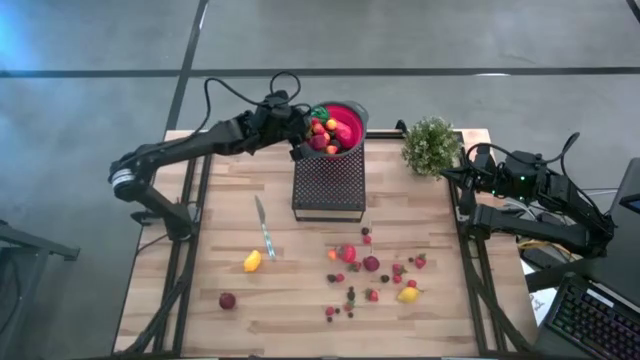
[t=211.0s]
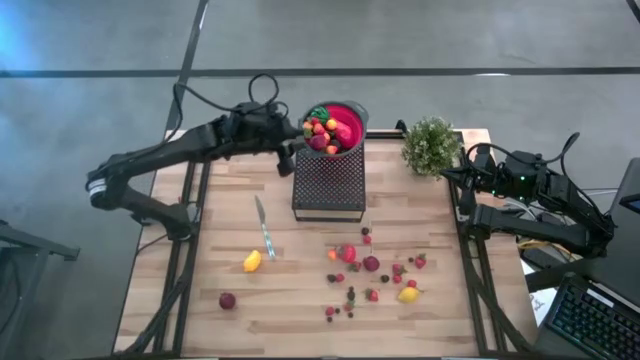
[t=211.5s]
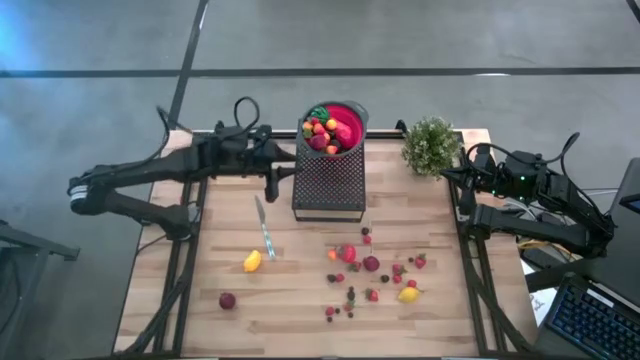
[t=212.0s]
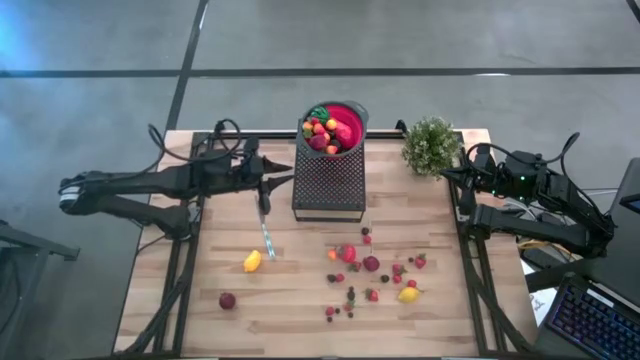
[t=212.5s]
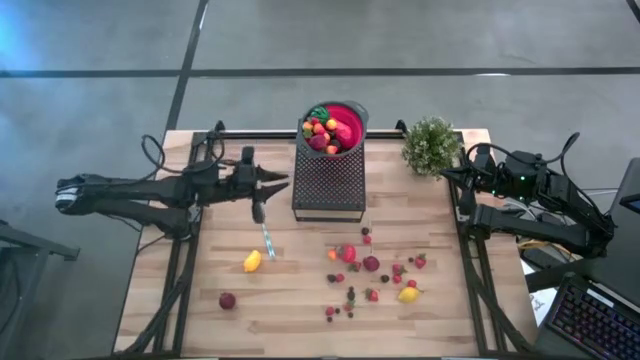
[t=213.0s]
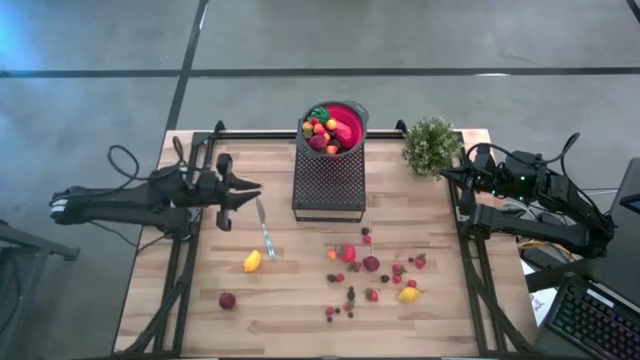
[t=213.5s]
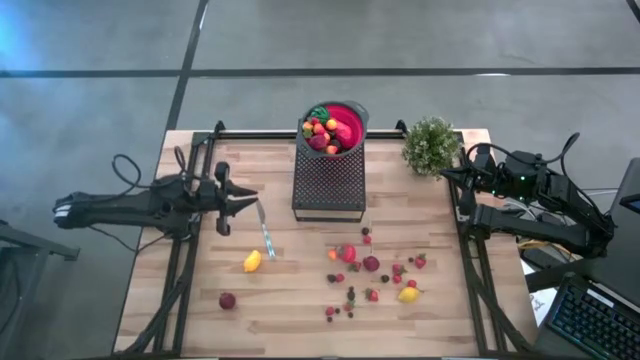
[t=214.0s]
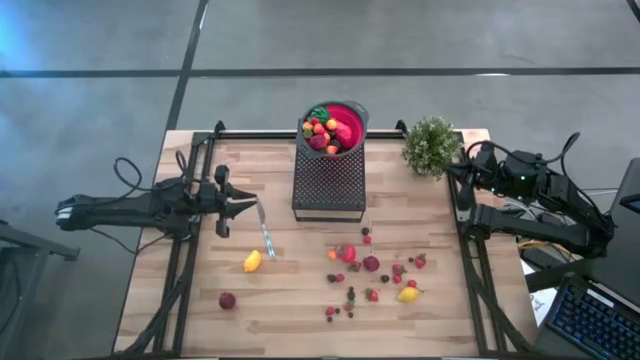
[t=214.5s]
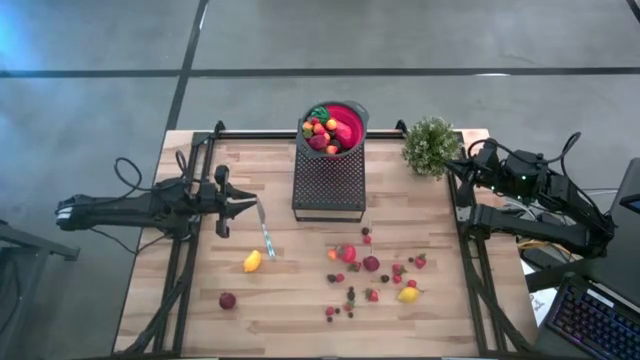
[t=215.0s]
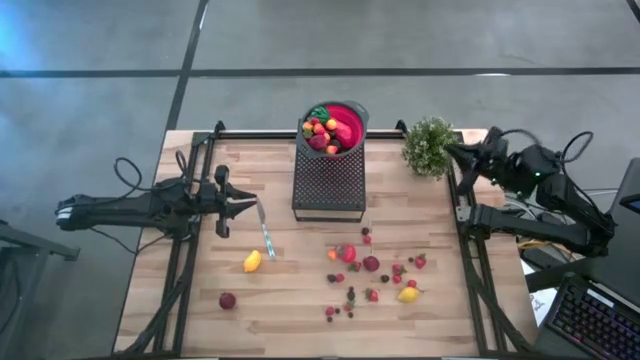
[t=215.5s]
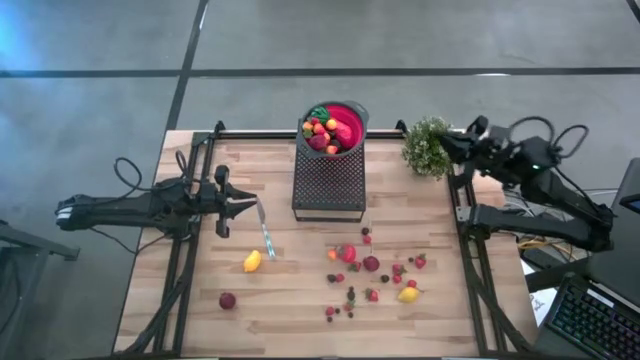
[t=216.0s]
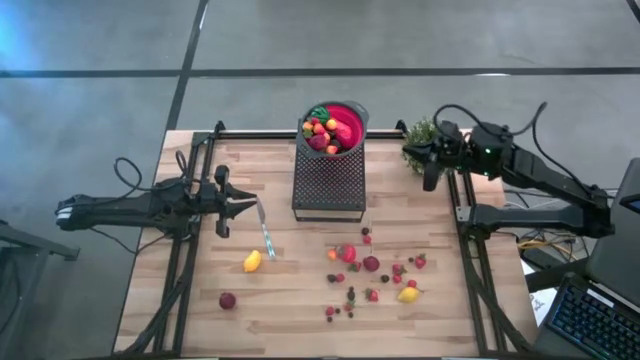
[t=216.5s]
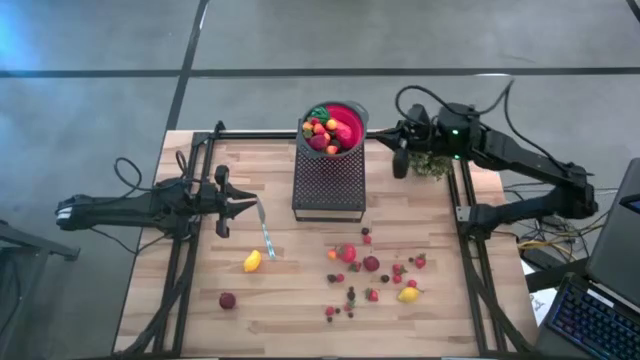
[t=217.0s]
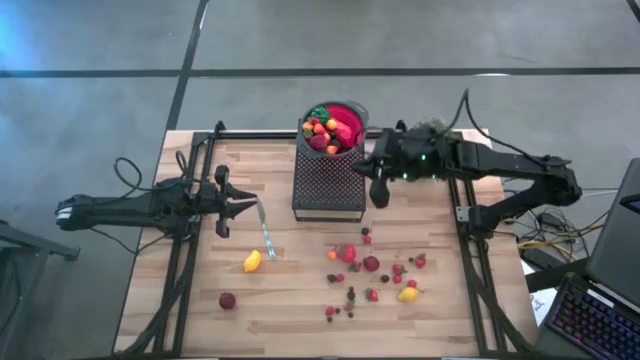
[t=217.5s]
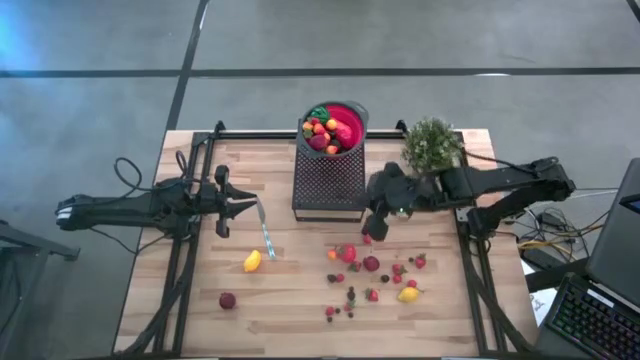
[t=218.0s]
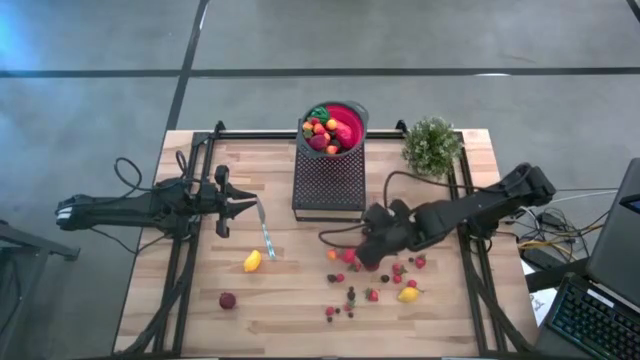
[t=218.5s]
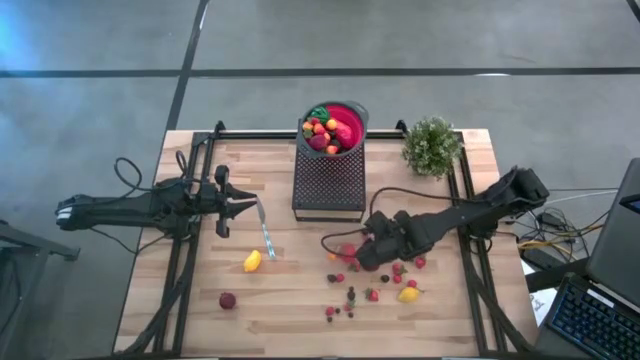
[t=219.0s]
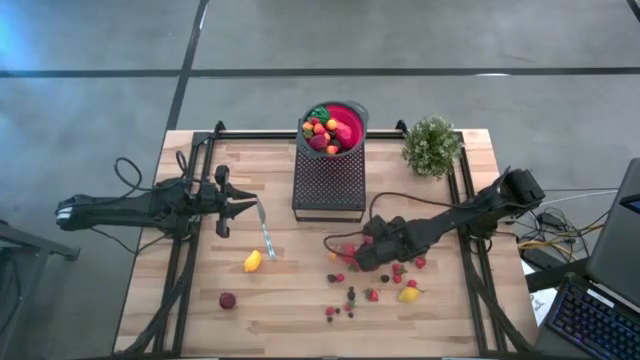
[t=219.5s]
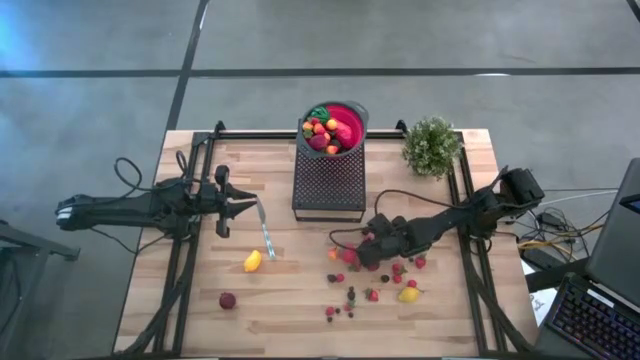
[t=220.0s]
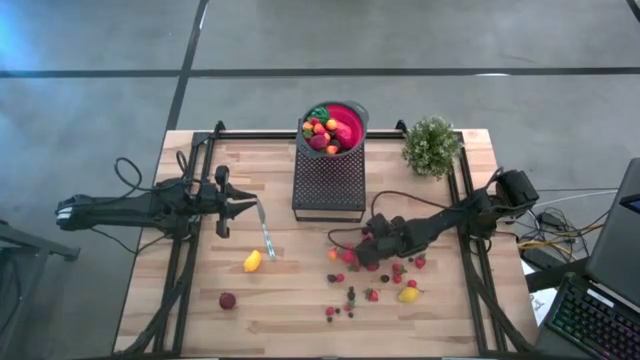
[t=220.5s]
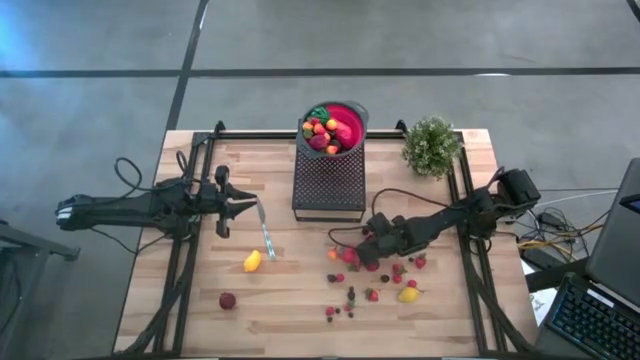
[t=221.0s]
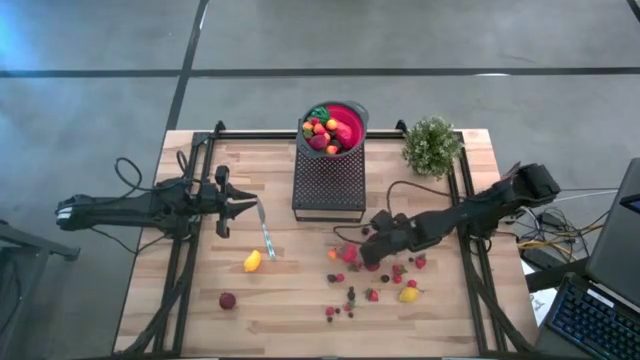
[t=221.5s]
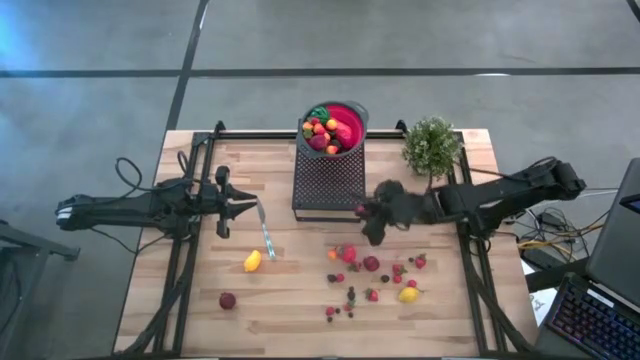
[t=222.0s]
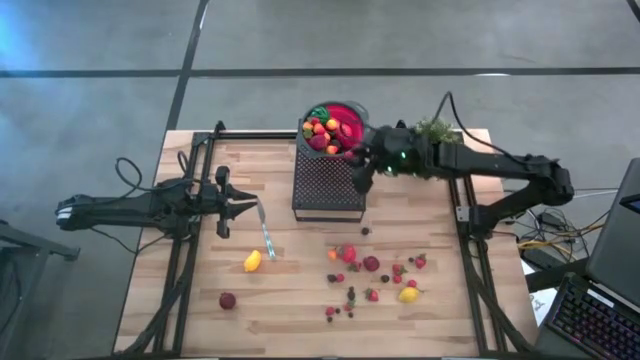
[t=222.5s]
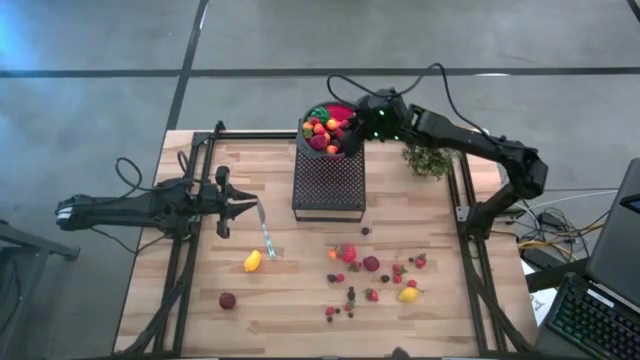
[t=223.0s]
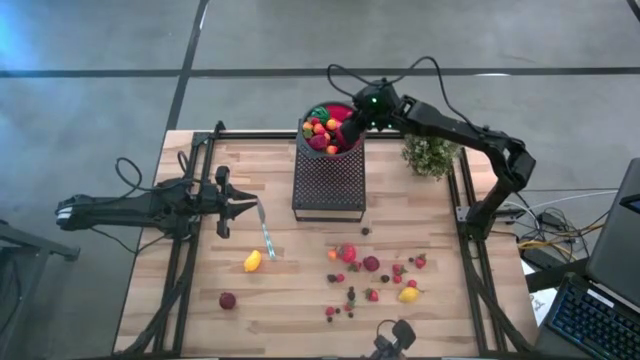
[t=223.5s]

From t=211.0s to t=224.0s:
Task: Pick & Place Fruit
Put the top red cherry into the strainer bowl on the shelf

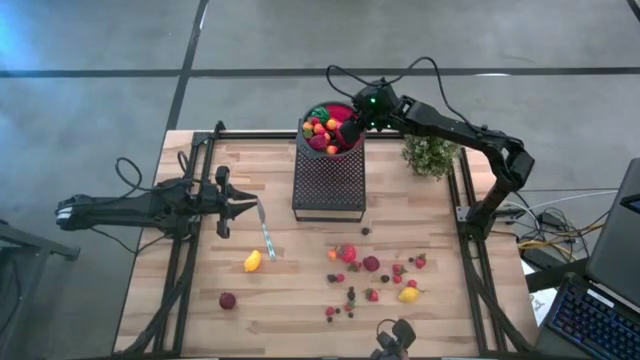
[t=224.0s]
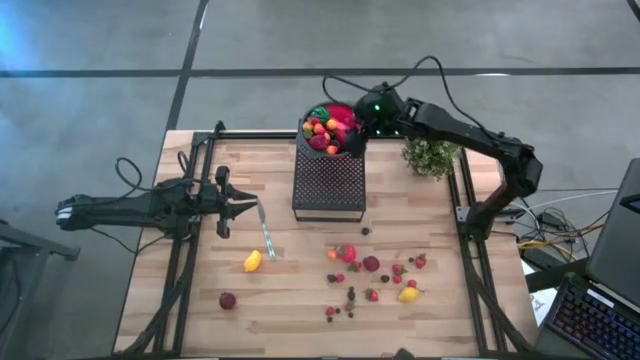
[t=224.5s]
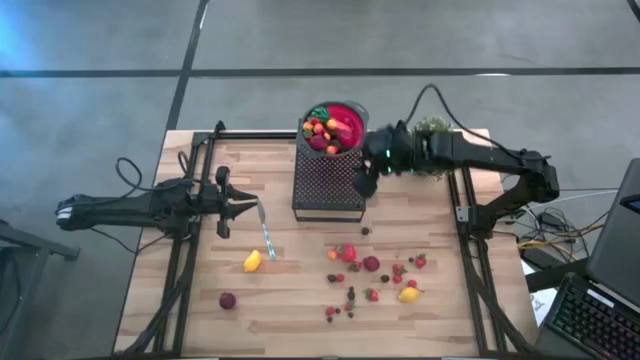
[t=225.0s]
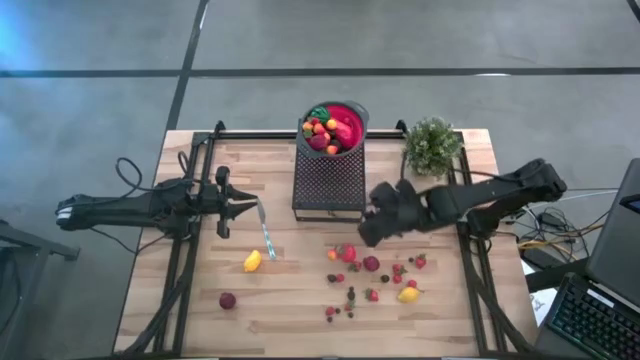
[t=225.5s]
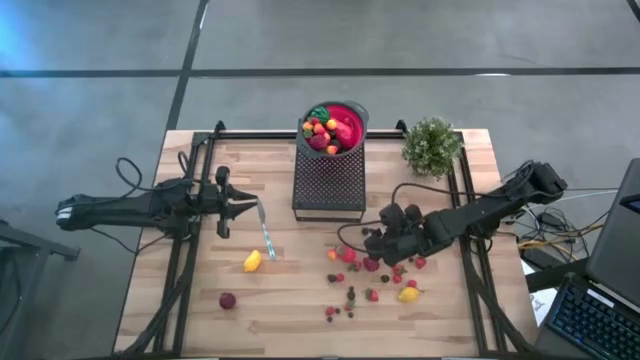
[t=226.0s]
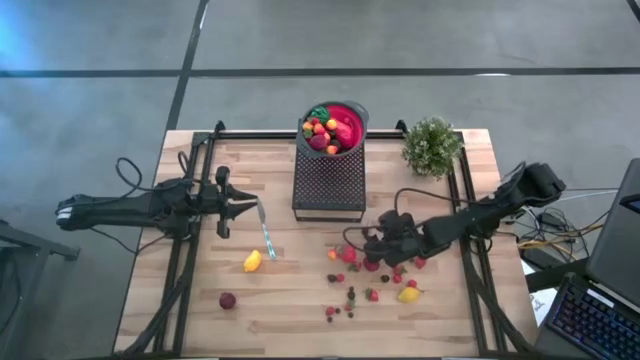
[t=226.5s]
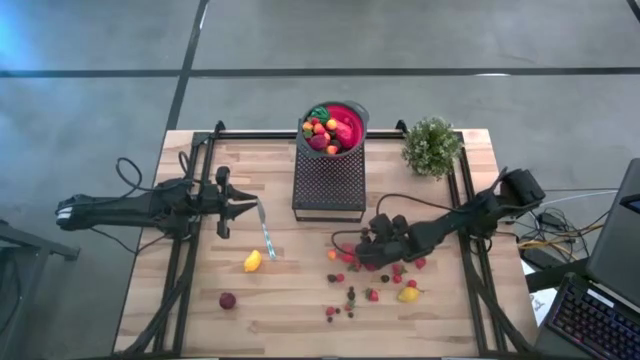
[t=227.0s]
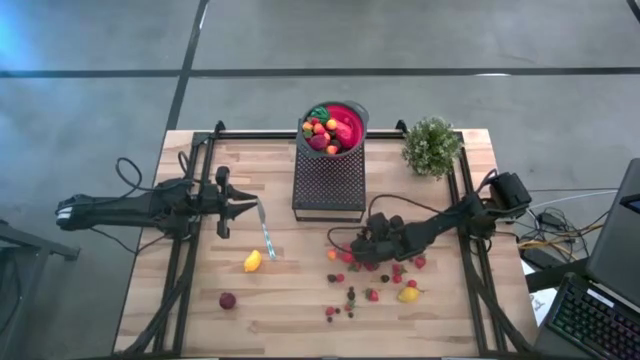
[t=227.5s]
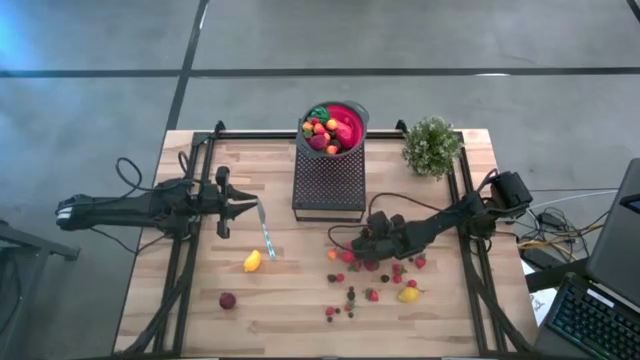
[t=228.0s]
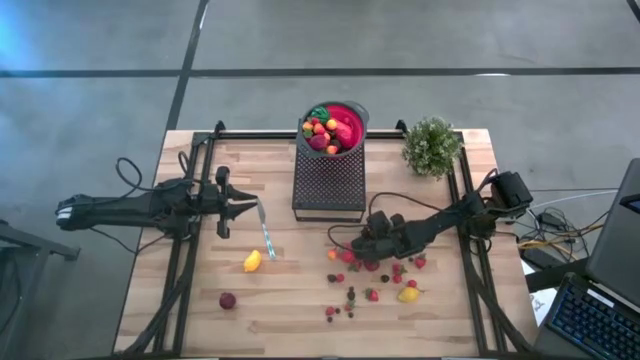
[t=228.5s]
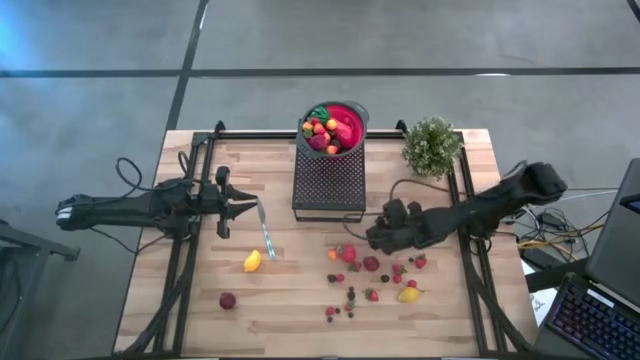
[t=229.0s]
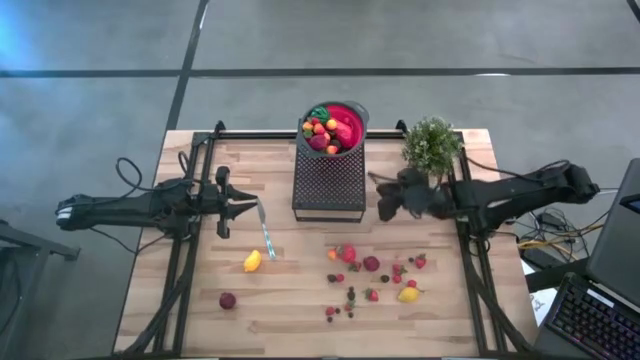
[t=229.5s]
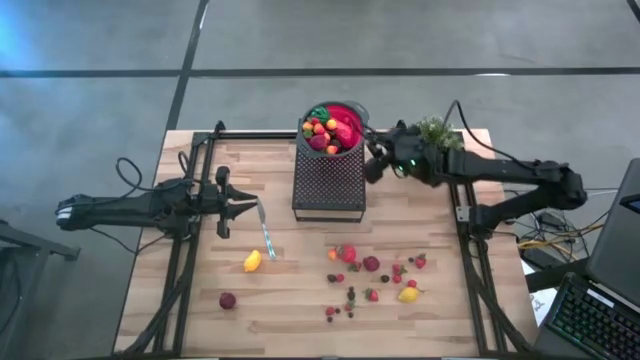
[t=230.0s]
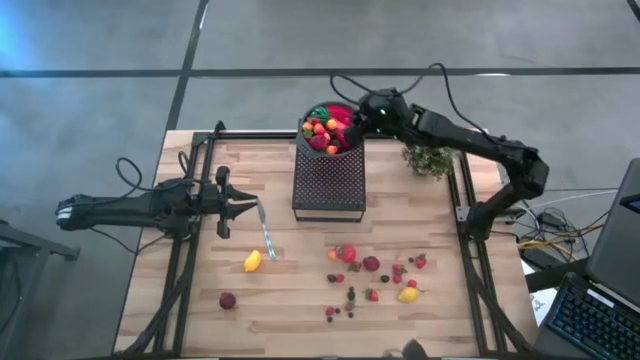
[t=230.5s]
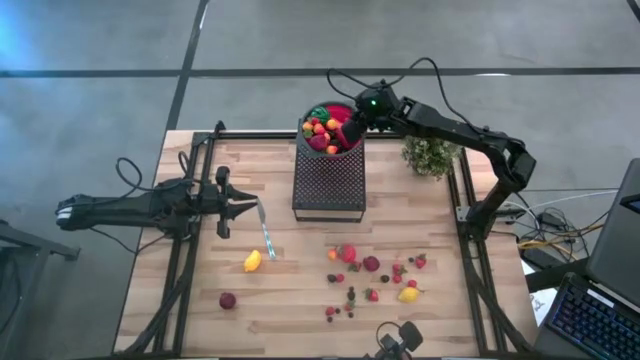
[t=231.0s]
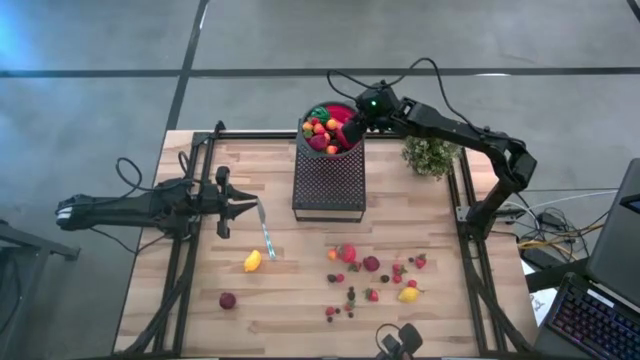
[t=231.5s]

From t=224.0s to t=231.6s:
Put the top black cherry into the strainer bowl on the shelf
